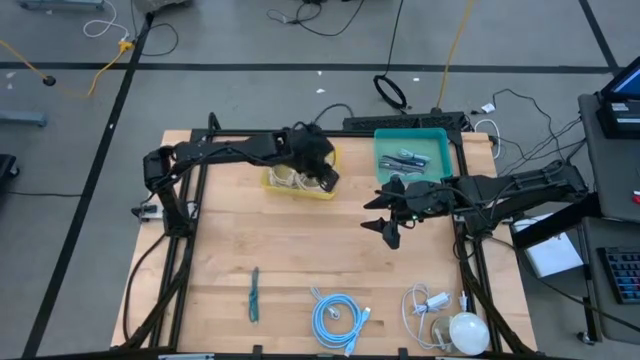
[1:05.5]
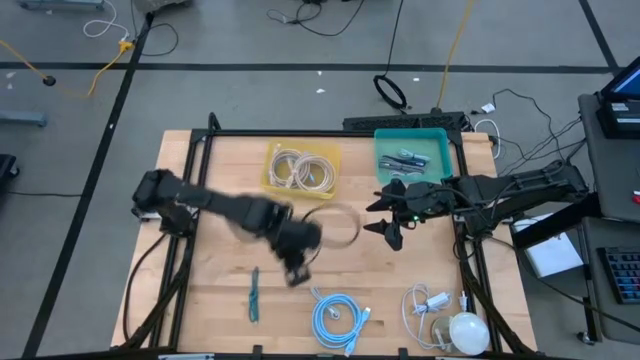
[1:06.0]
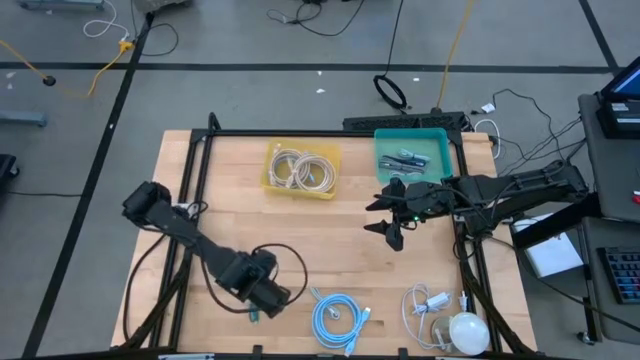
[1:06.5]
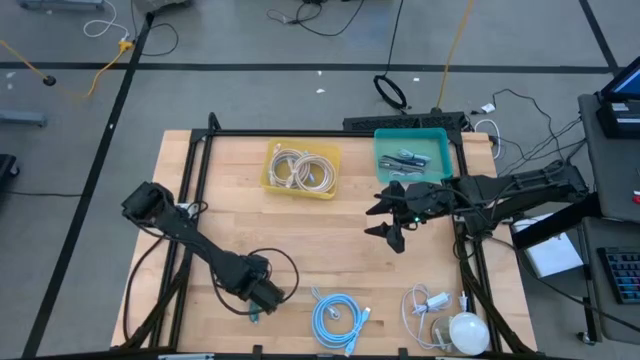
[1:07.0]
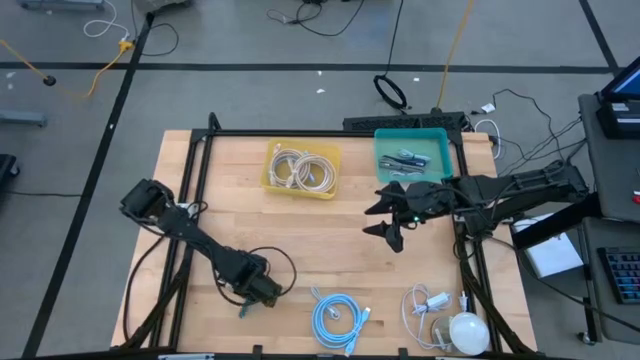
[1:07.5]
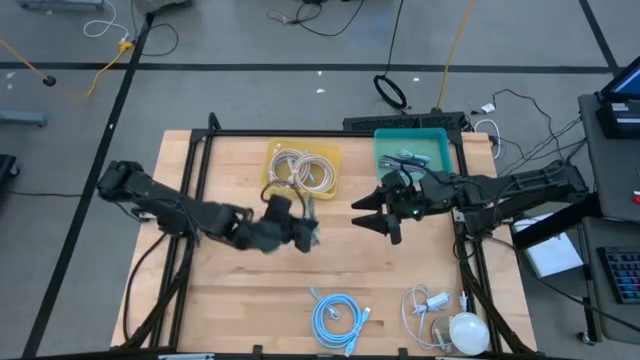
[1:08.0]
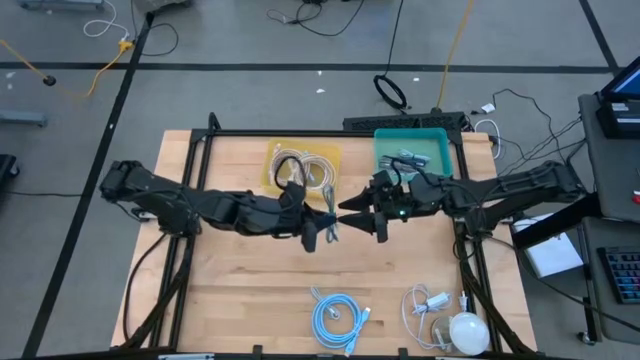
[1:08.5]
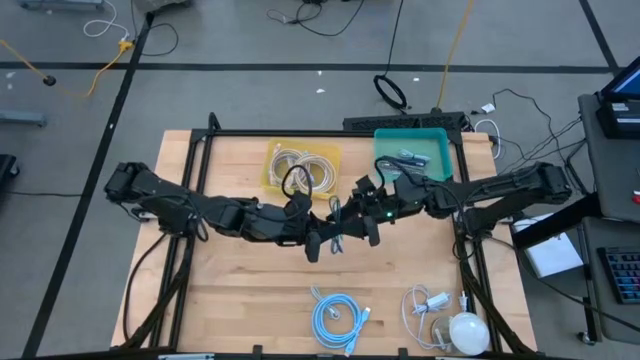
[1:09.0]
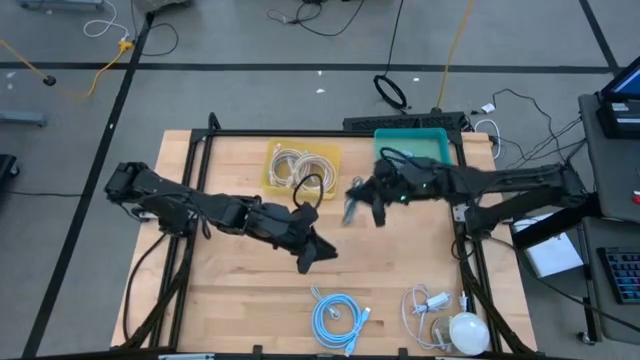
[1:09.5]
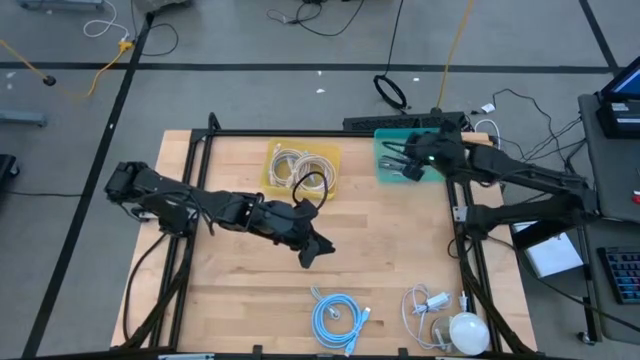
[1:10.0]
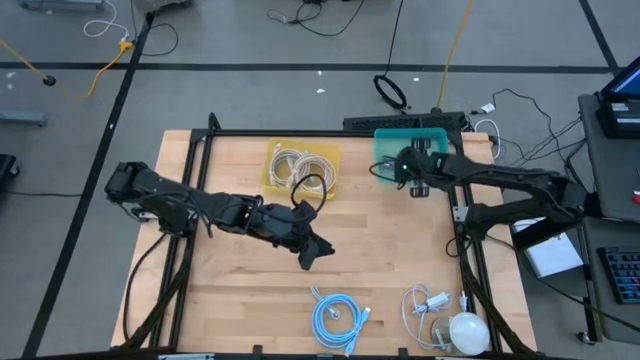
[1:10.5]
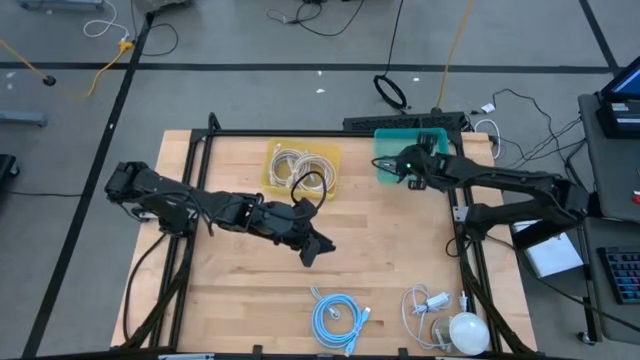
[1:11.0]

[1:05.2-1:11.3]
Task: Pick & Place USB Port
Put the green patterned charger cable into the green bin

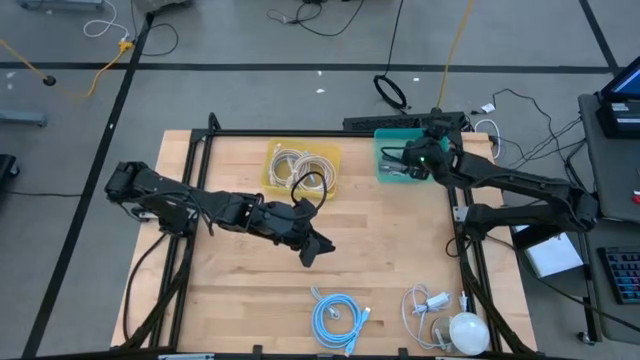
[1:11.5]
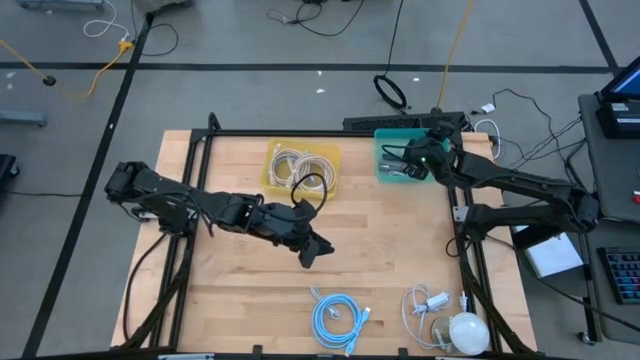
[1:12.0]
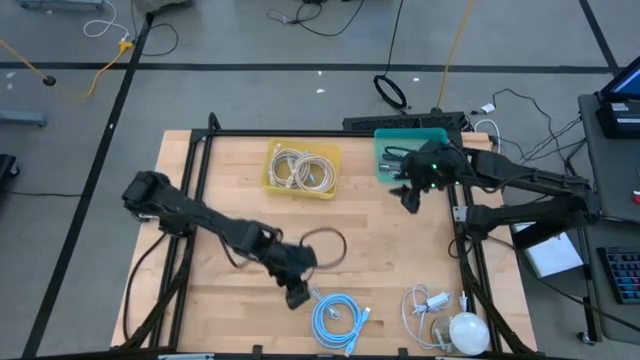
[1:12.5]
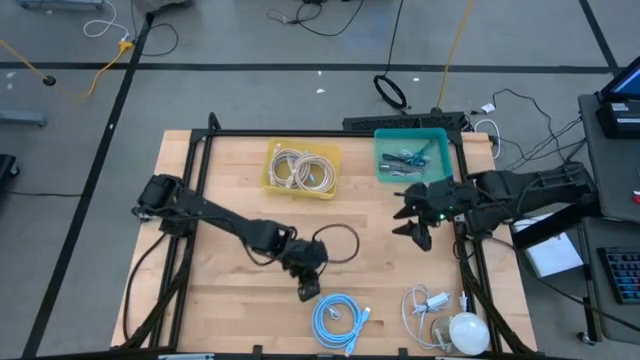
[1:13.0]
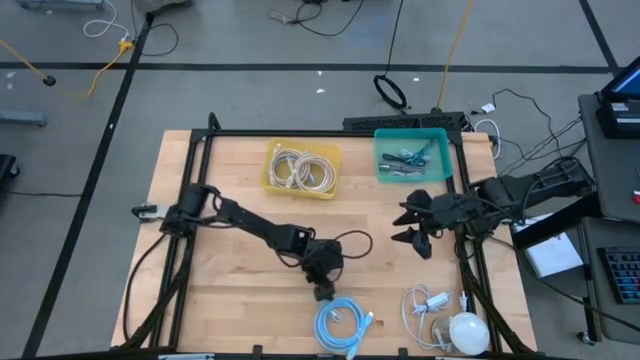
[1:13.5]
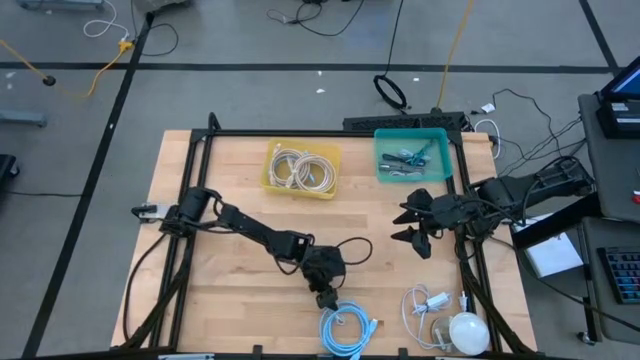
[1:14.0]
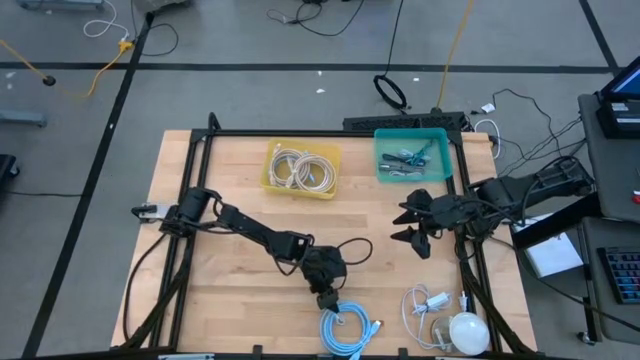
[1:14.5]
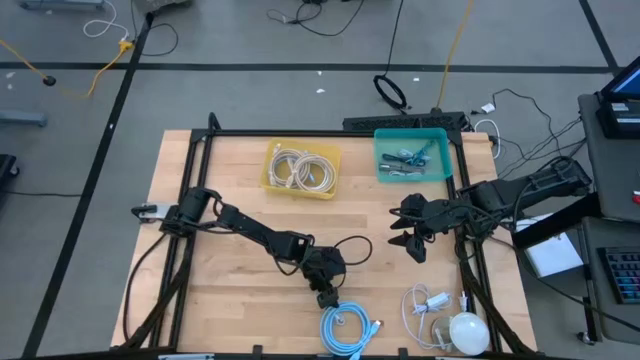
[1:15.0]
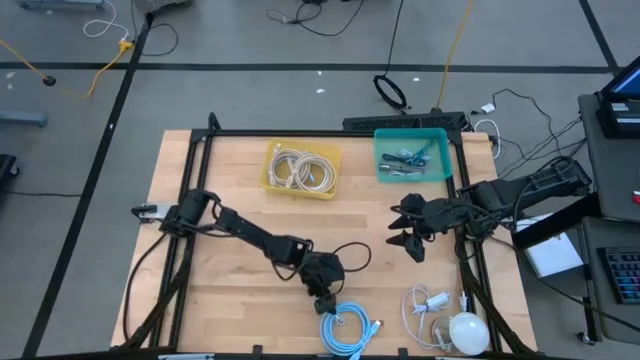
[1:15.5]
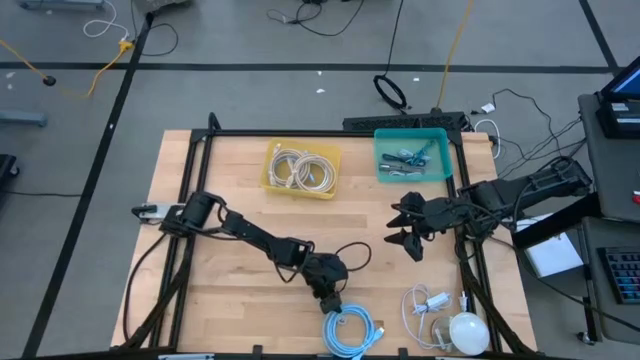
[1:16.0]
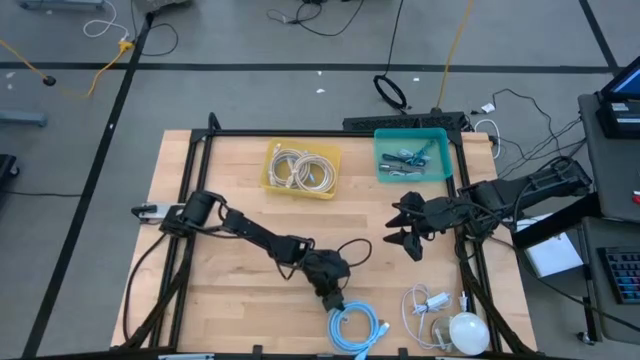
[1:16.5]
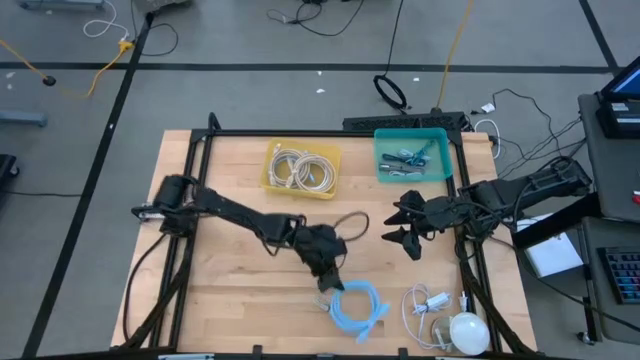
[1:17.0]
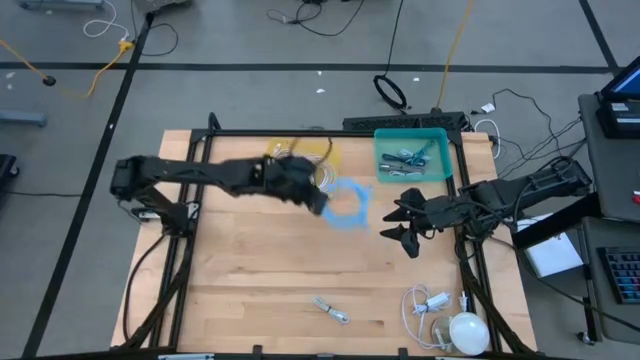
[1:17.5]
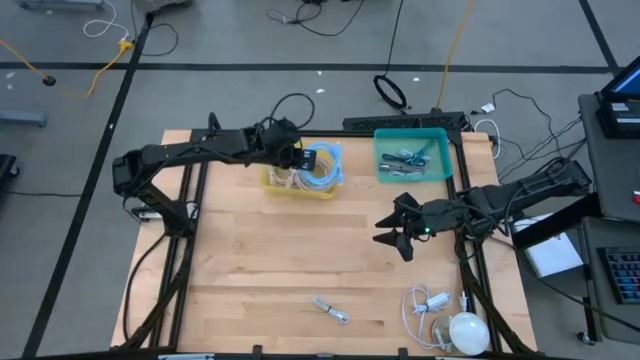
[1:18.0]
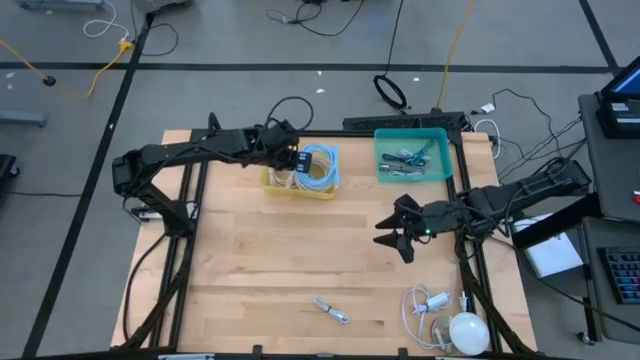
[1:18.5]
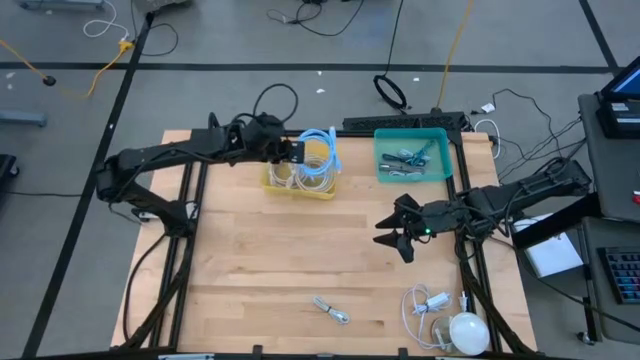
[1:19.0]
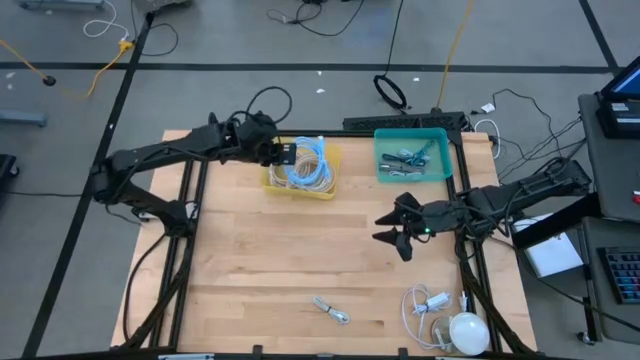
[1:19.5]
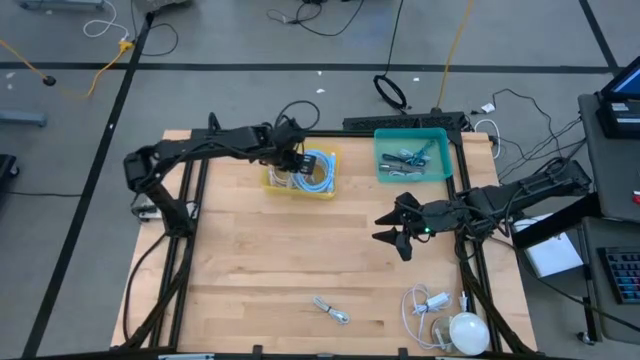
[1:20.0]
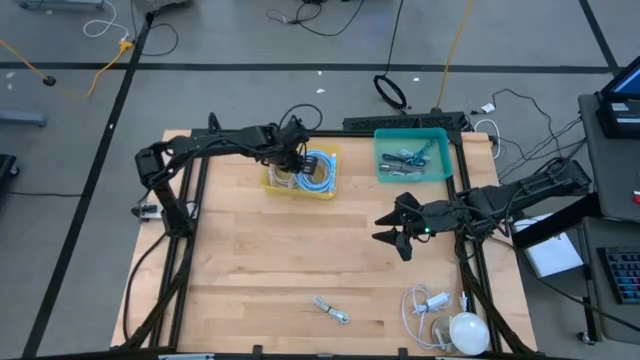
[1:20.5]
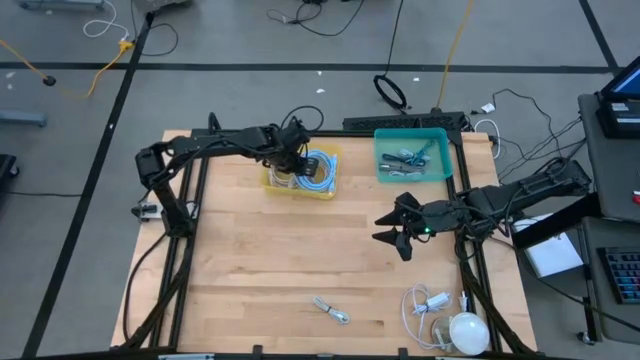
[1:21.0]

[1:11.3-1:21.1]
Put the blue USB cable into the yellow bin

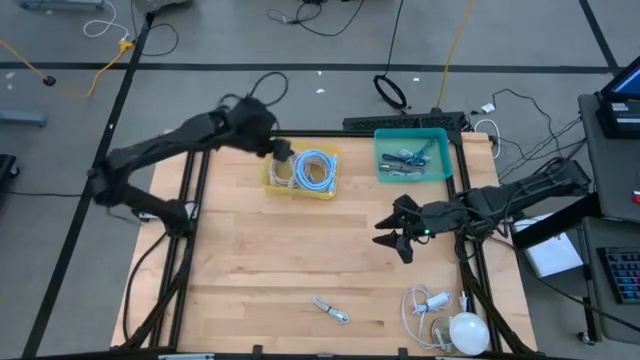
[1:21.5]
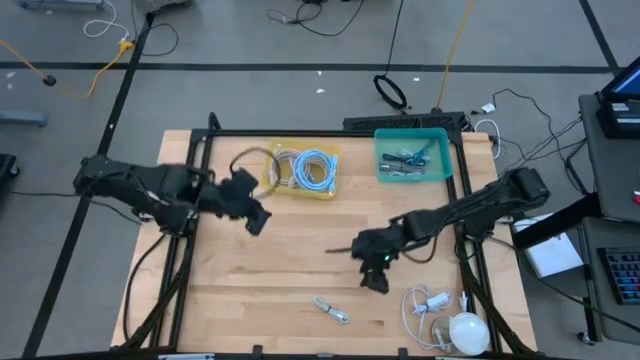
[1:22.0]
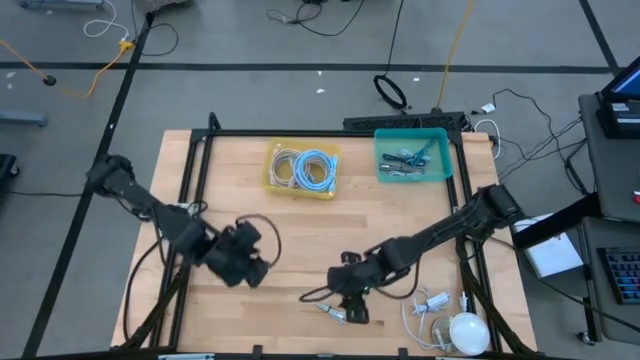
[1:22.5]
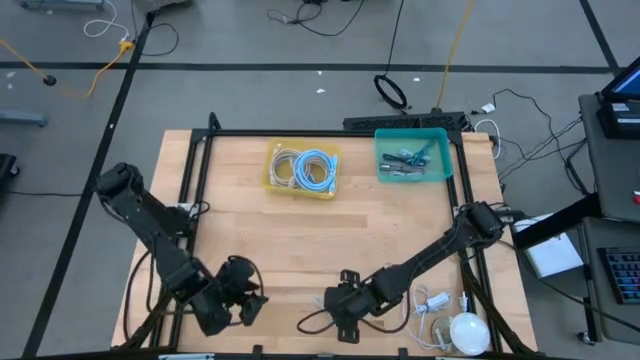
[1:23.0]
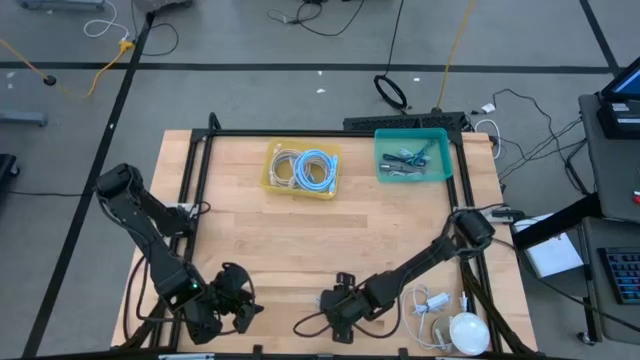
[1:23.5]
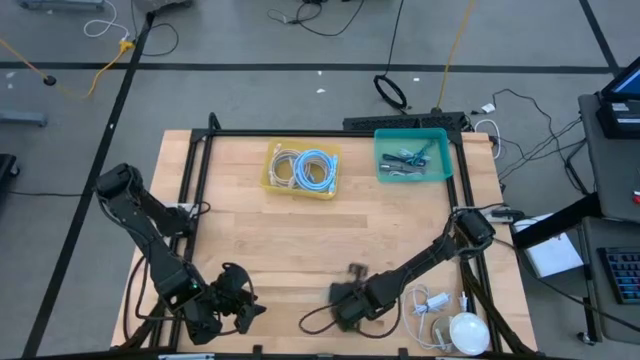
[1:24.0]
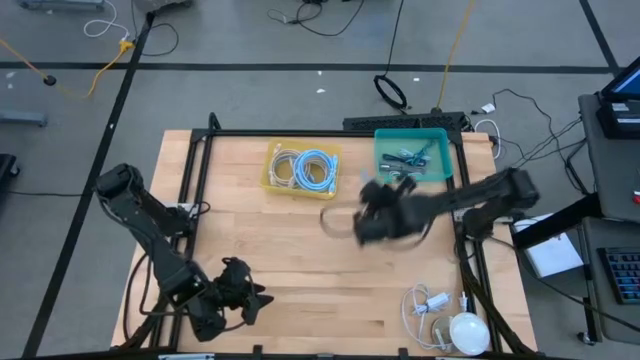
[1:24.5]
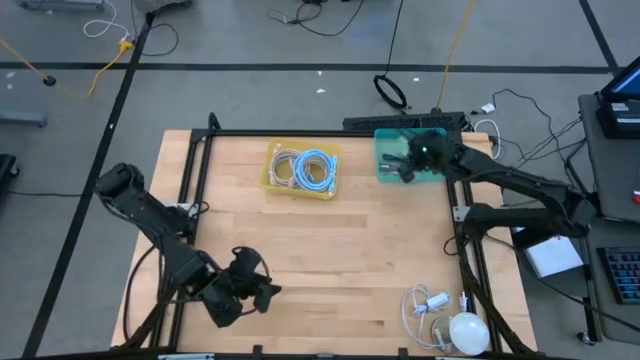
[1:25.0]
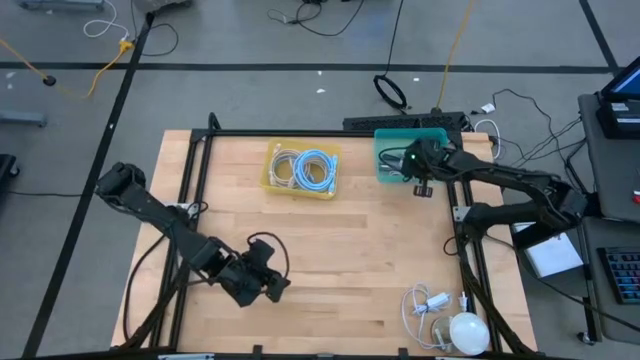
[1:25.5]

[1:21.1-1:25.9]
Put the white charger cable into the green bin

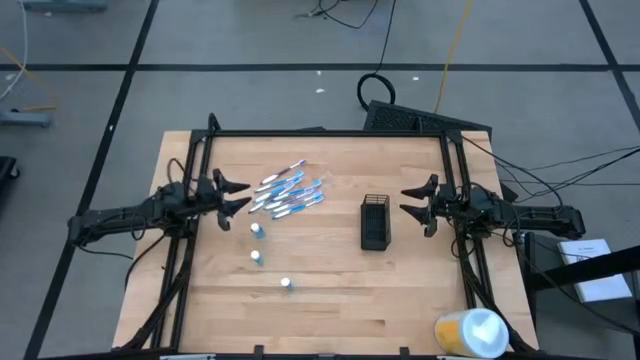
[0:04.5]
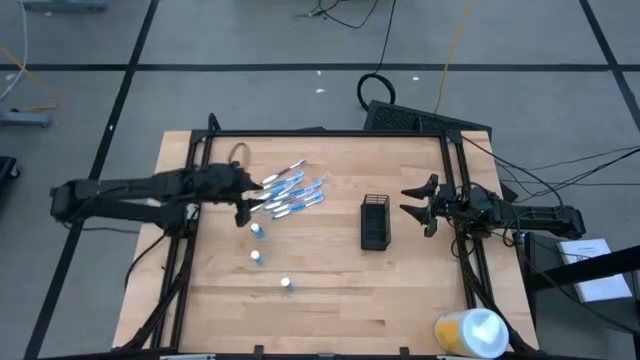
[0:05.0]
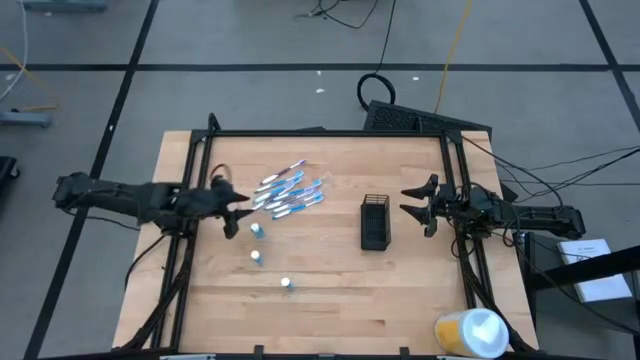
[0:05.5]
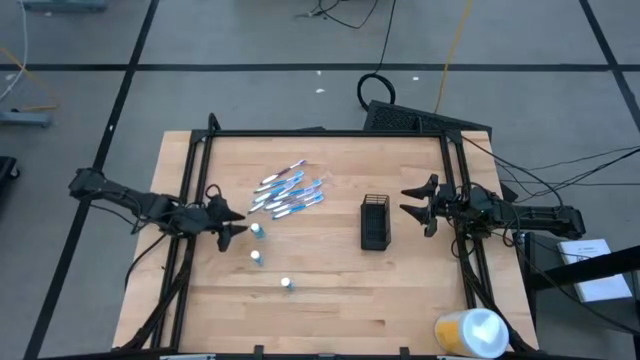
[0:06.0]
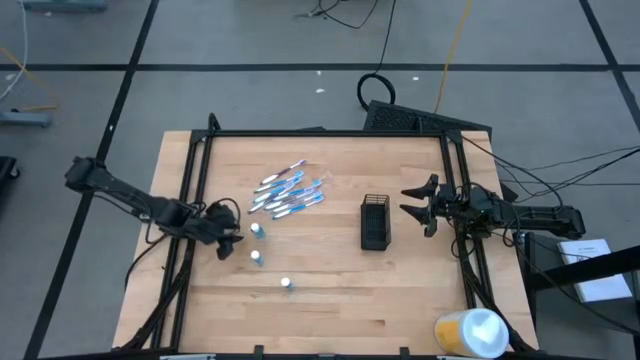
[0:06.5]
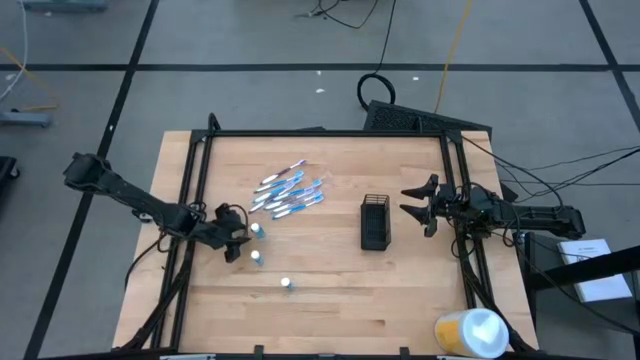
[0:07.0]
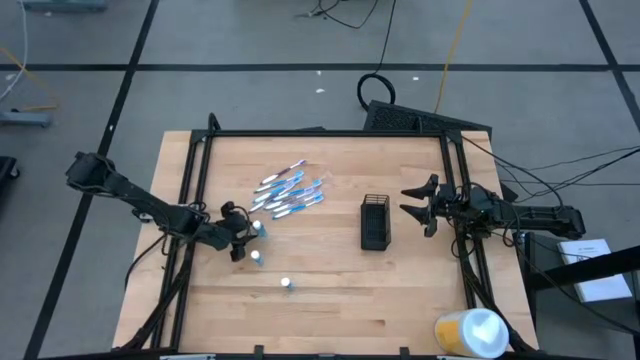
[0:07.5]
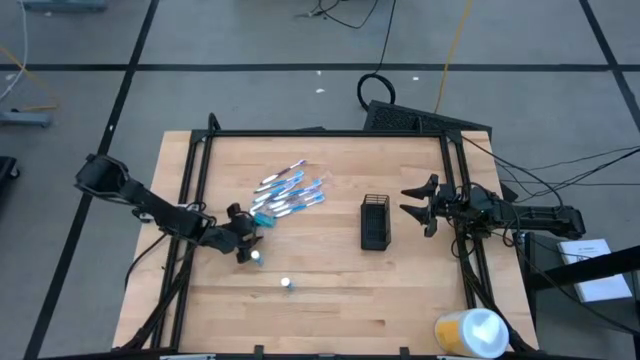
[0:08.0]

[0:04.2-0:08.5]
Task: Pick & Place toothbrushing station
Put the mouthwash into the middle section of the mesh organizer
